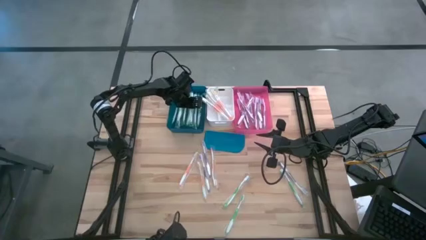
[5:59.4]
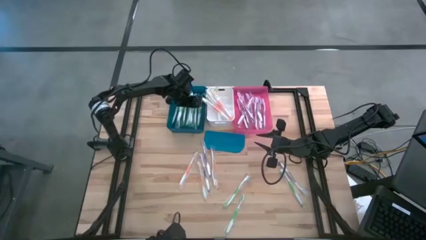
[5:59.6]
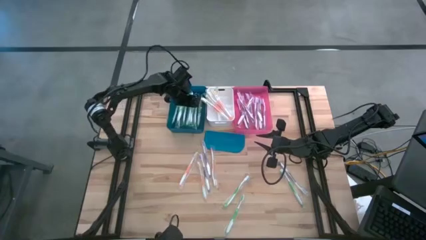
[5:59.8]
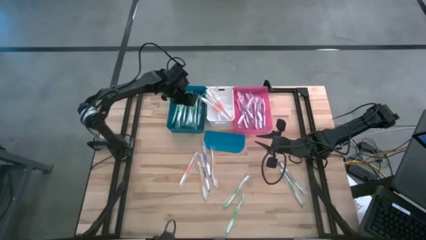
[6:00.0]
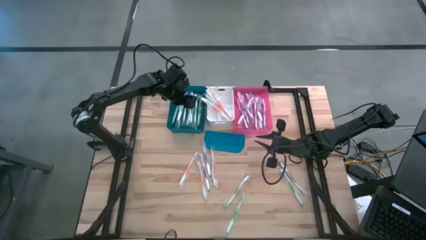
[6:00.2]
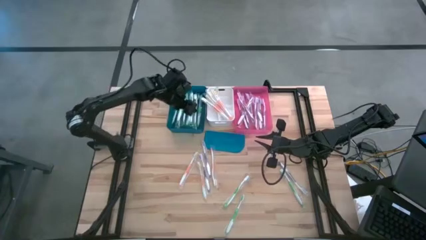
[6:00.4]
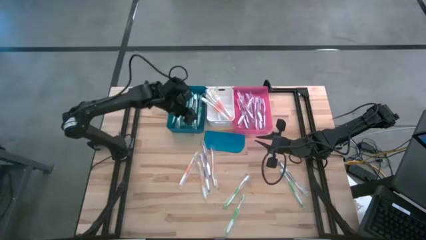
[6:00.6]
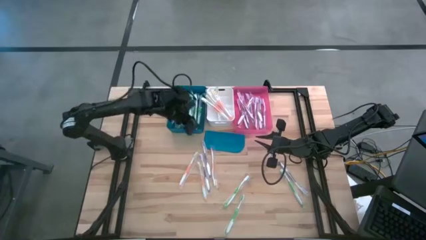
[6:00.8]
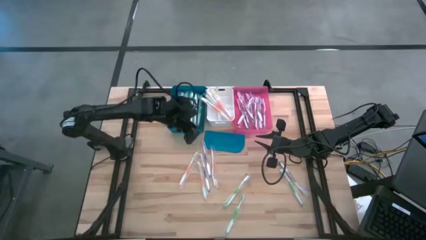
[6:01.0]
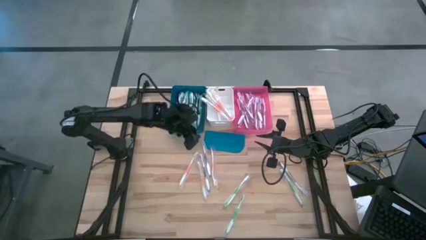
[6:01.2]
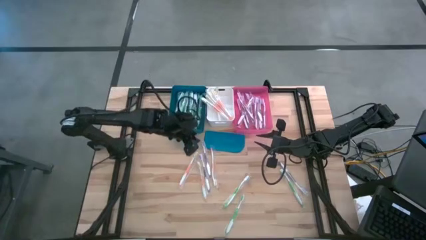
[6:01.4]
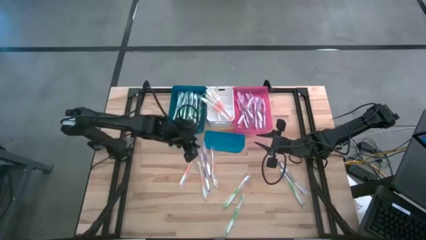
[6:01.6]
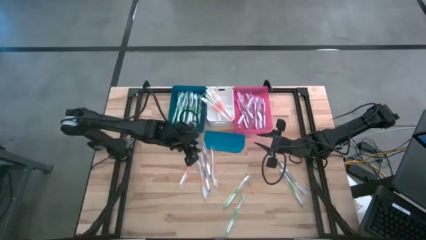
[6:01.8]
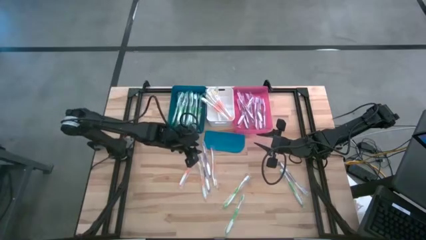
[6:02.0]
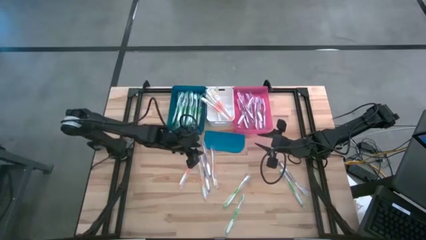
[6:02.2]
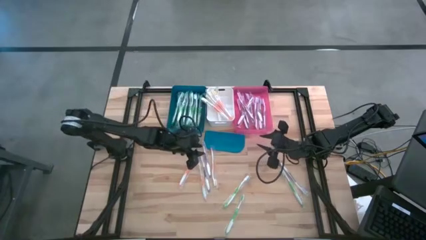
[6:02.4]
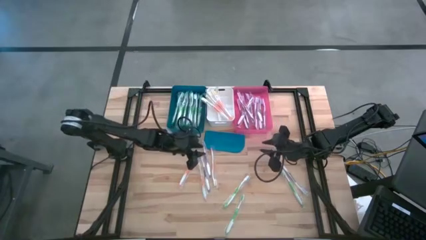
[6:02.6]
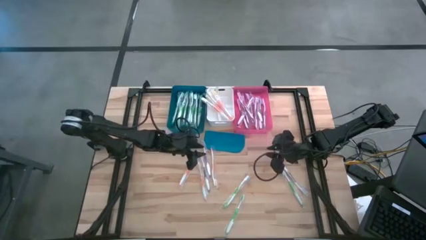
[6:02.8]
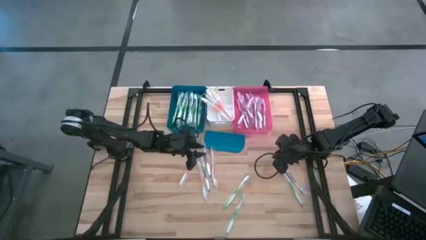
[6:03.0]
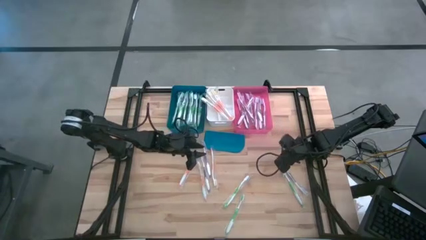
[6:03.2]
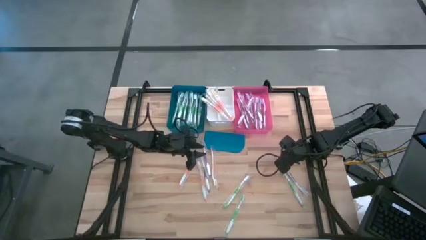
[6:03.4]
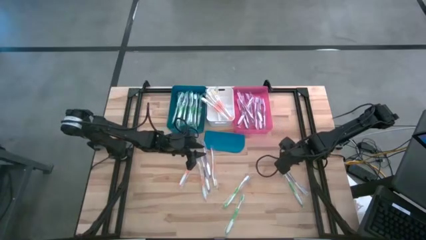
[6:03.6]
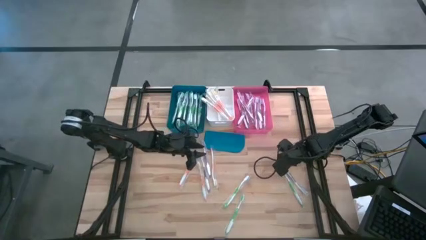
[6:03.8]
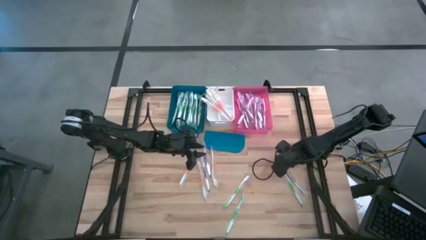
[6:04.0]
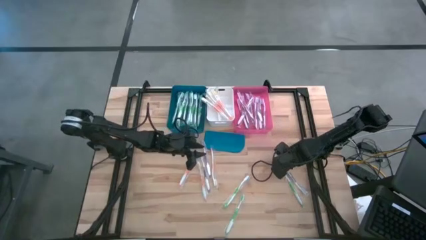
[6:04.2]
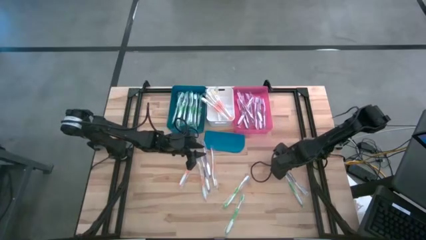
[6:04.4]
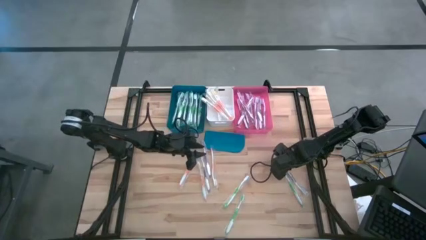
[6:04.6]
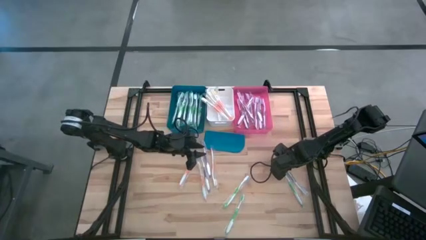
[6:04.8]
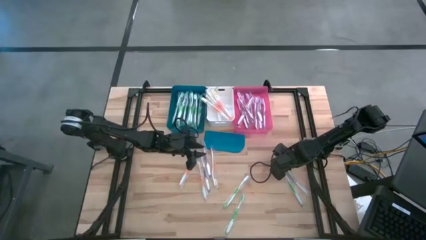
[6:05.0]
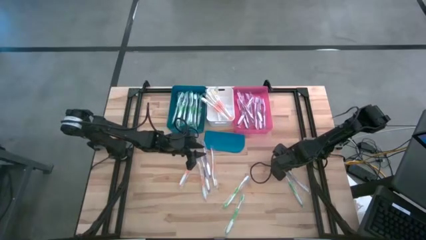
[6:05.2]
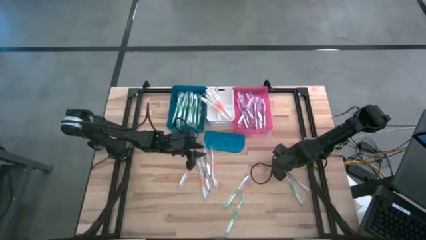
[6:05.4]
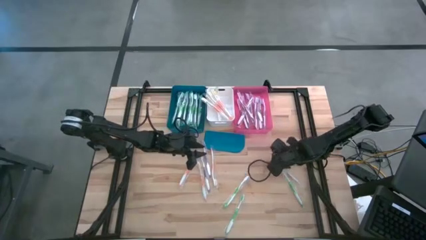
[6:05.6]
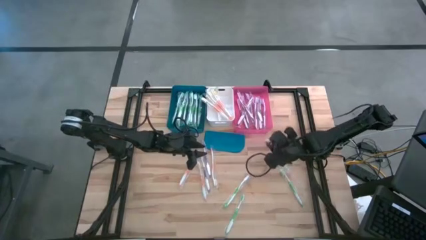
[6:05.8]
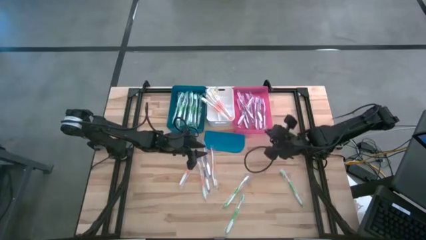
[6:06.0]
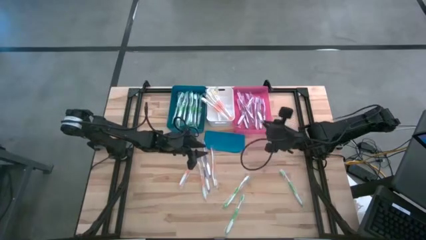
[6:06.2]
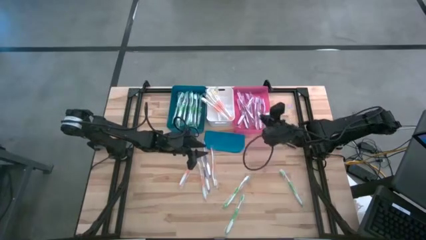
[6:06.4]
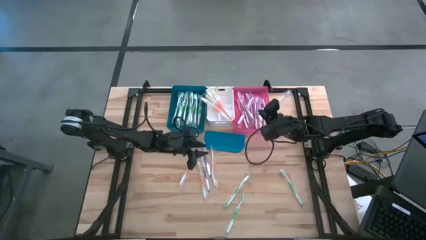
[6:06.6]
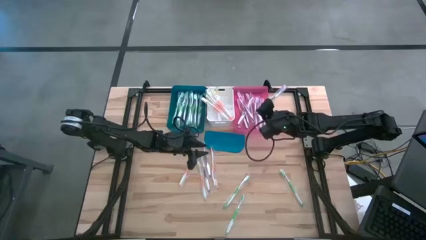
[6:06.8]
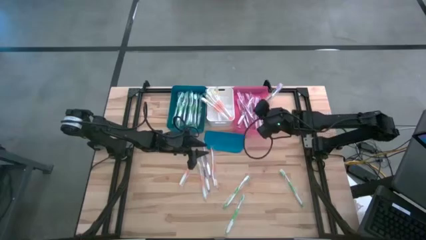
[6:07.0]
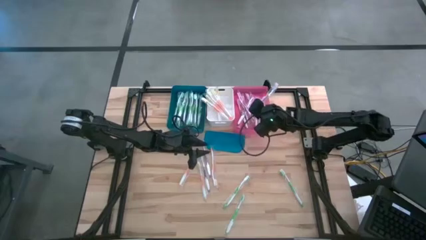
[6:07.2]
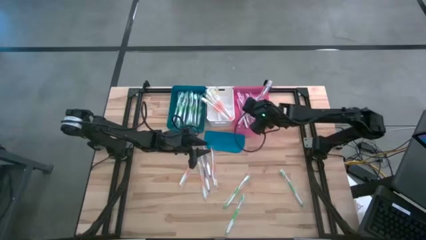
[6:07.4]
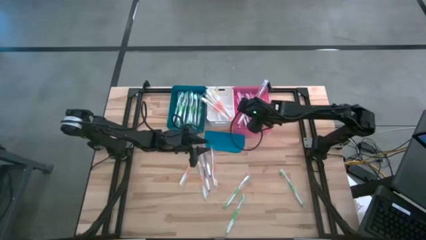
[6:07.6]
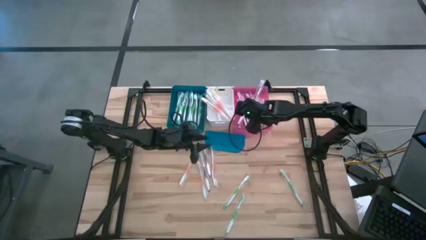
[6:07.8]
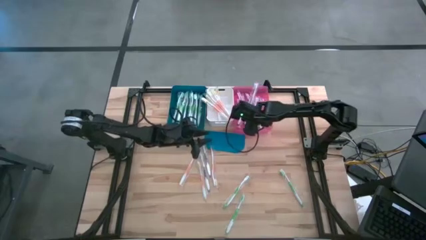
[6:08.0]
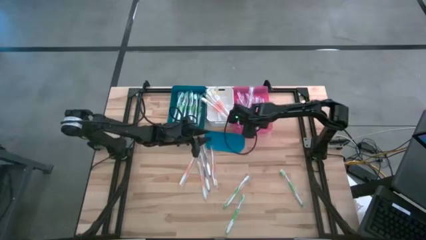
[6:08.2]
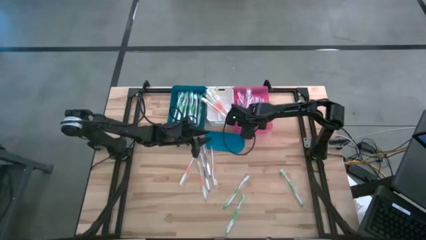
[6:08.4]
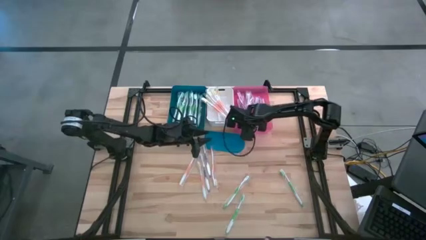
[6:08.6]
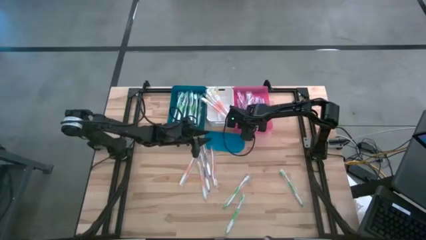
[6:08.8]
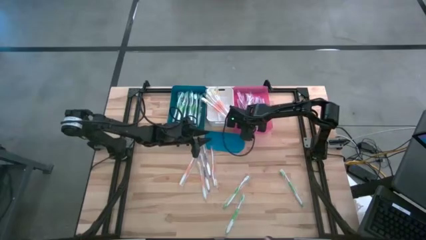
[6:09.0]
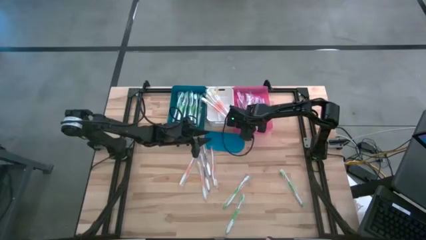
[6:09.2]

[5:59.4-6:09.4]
Task: Pick & Place Toothbrushes
Put the right purple toothbrush into the pink bin
